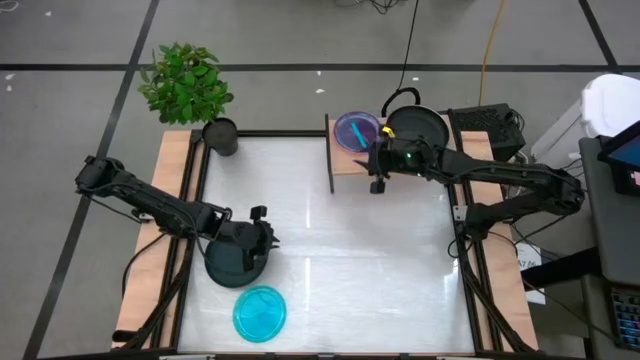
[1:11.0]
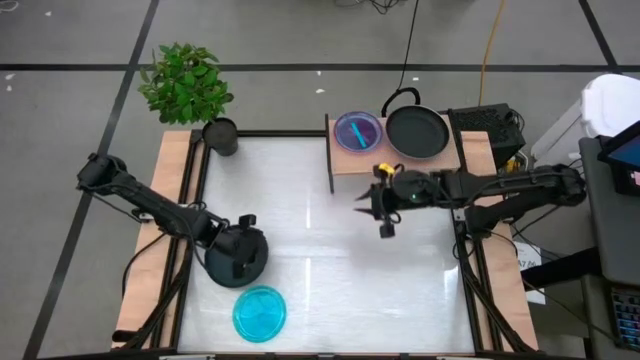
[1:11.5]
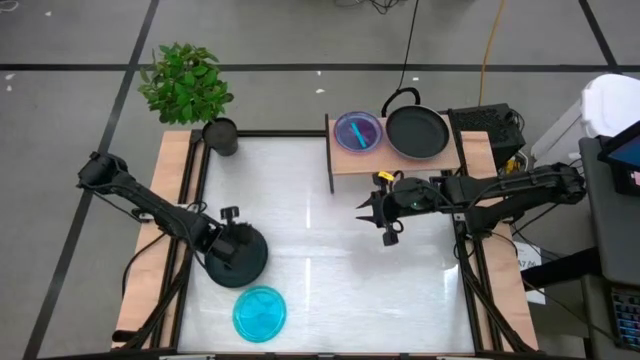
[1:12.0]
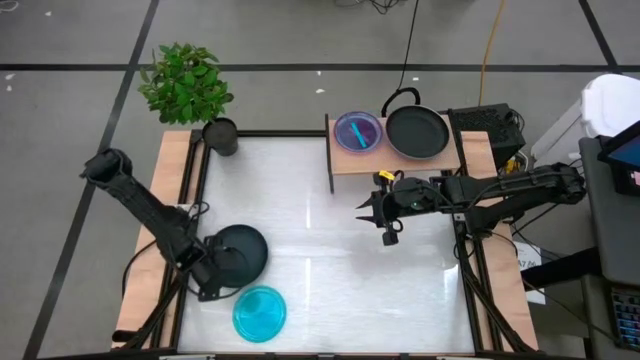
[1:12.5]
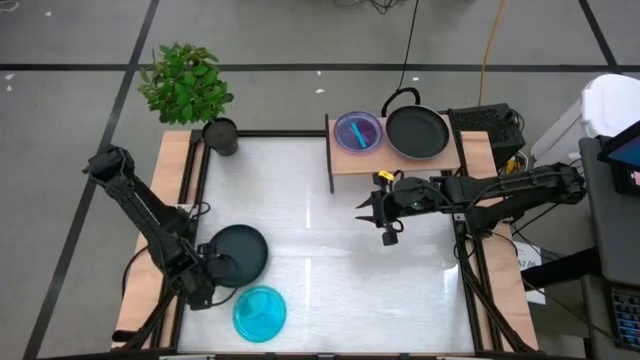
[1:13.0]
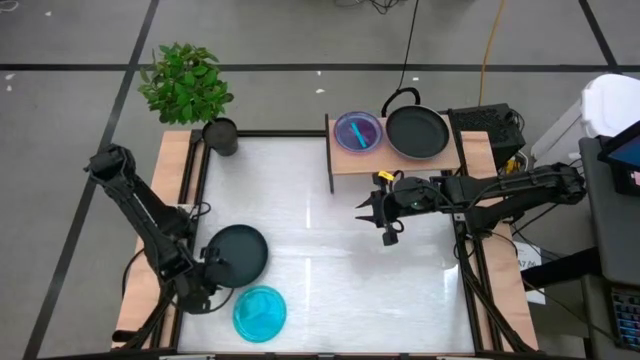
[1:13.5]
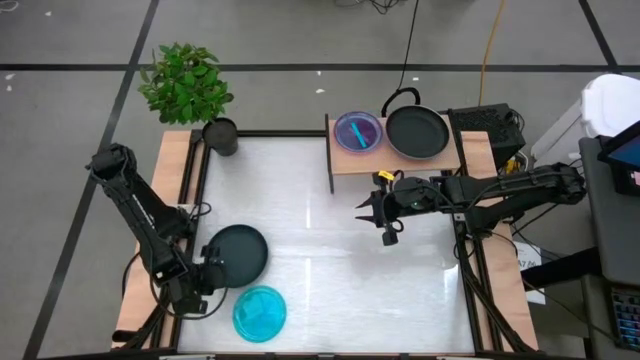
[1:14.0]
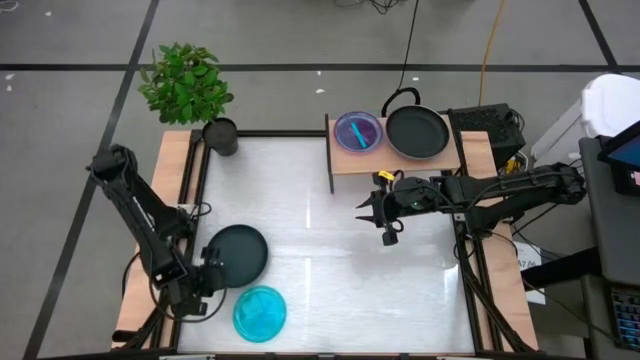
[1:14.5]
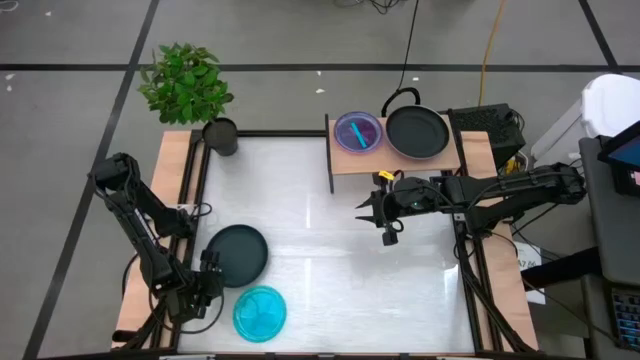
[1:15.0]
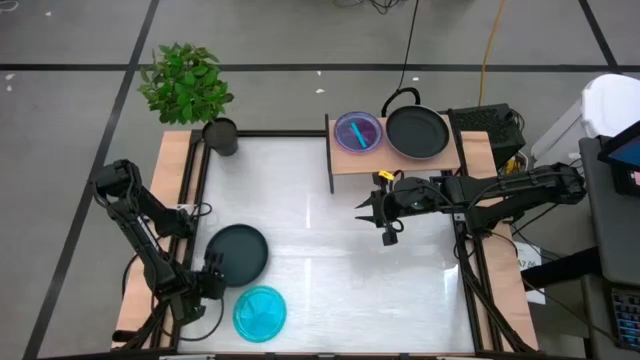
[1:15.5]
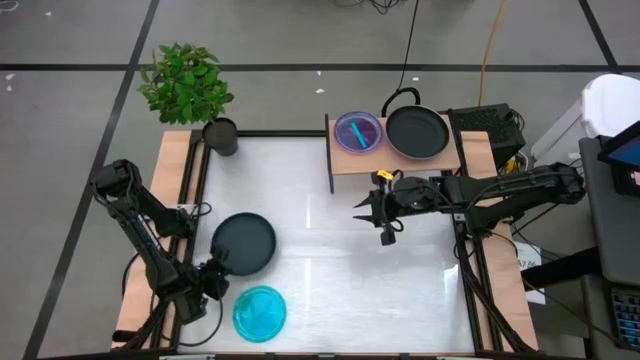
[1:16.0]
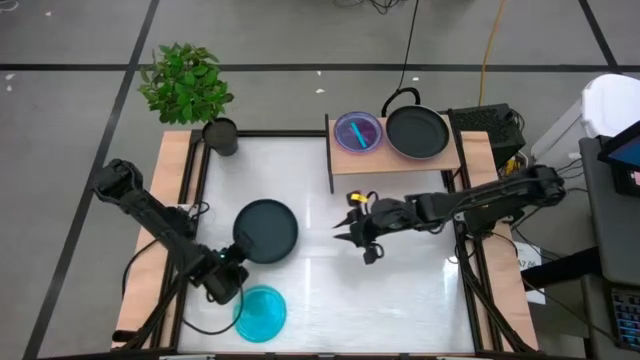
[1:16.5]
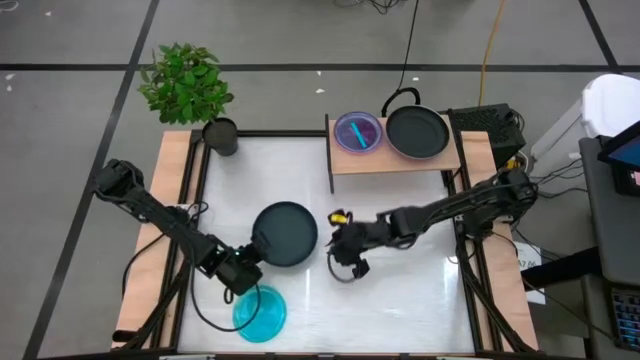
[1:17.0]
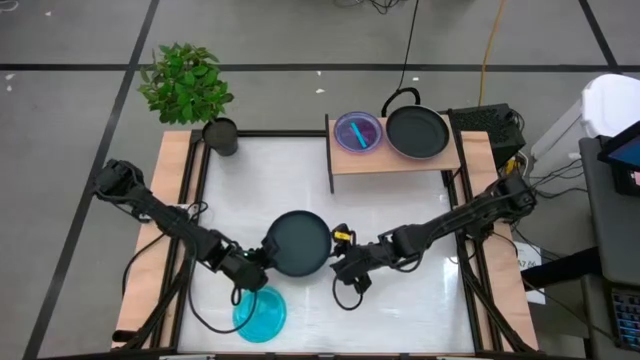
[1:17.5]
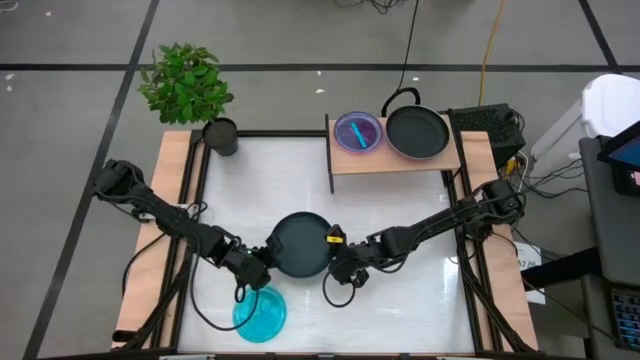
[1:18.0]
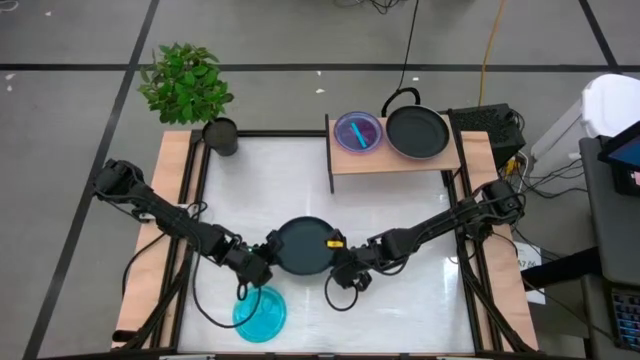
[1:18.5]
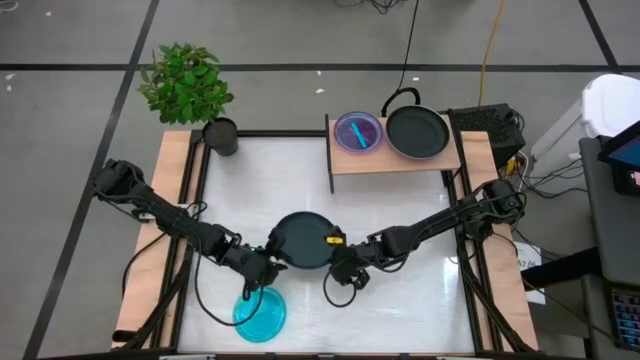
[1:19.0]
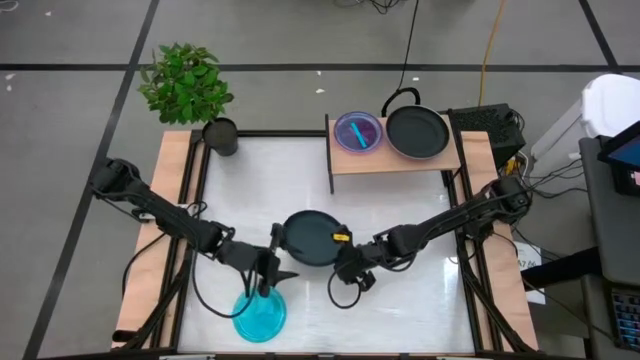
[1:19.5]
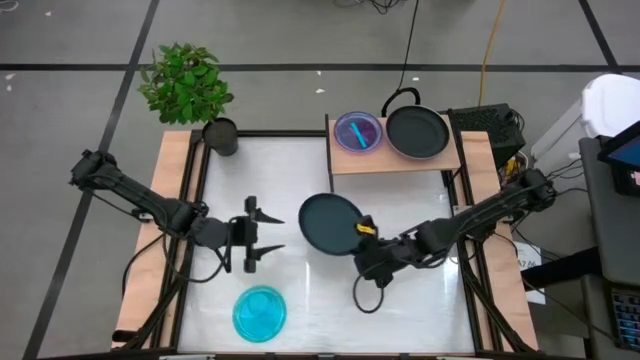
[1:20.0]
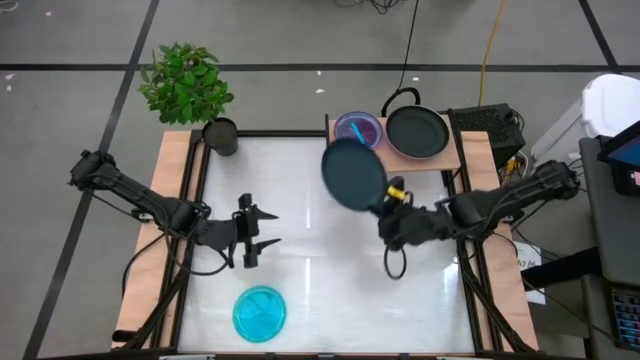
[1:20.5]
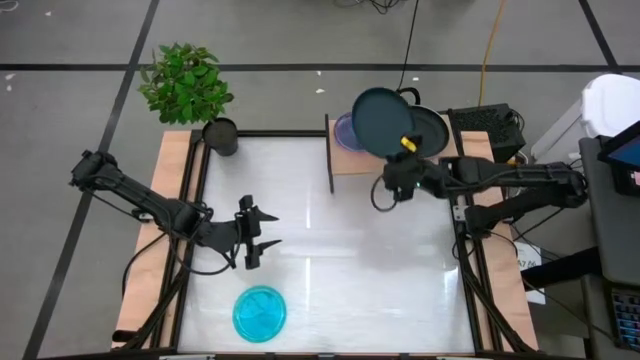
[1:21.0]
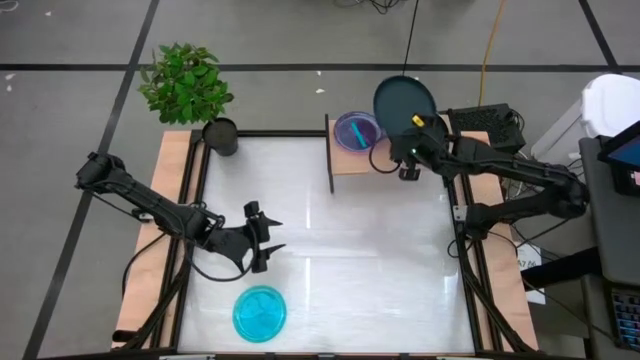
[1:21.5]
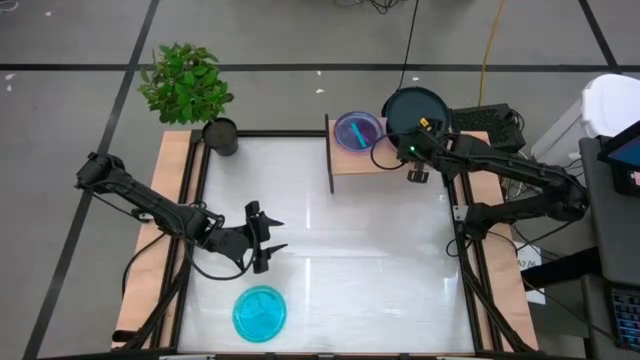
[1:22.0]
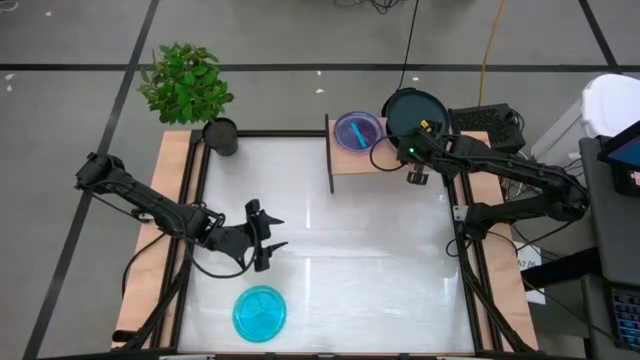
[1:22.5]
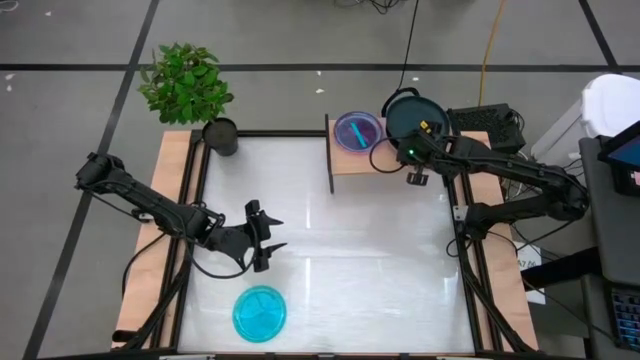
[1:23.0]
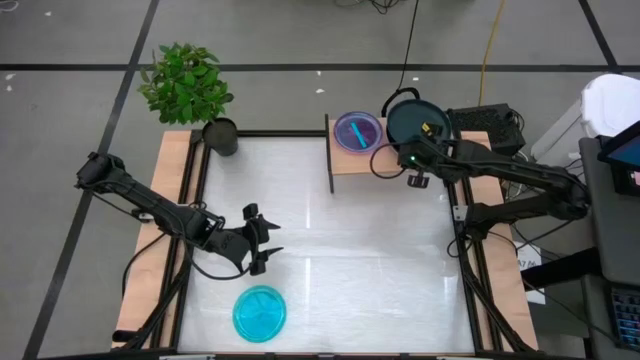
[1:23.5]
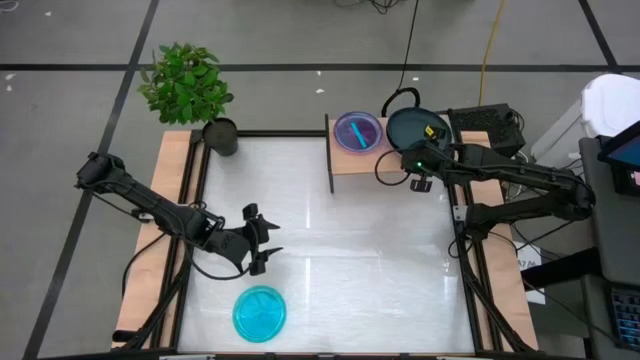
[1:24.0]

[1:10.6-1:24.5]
Task: Place and stack plates onto a shelf
Stack the dark blue plate on top of the black plate on the shelf

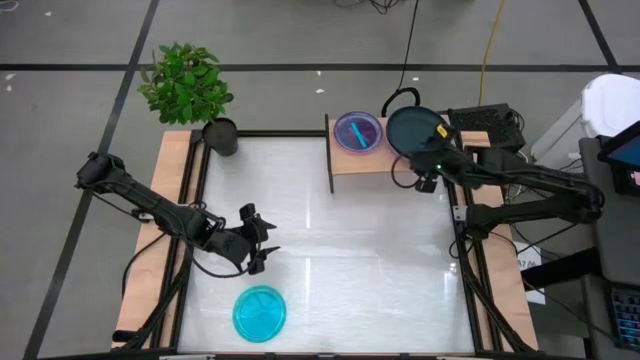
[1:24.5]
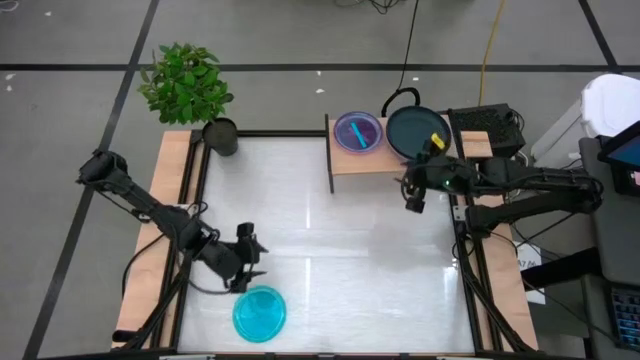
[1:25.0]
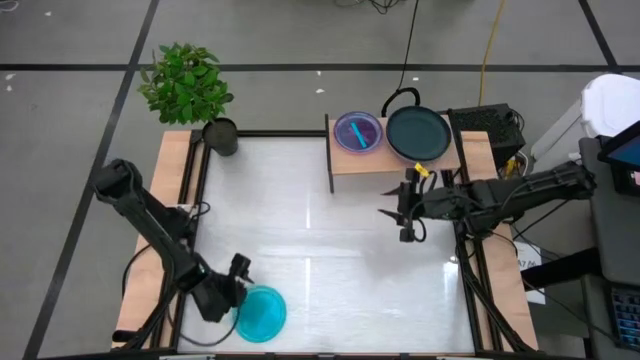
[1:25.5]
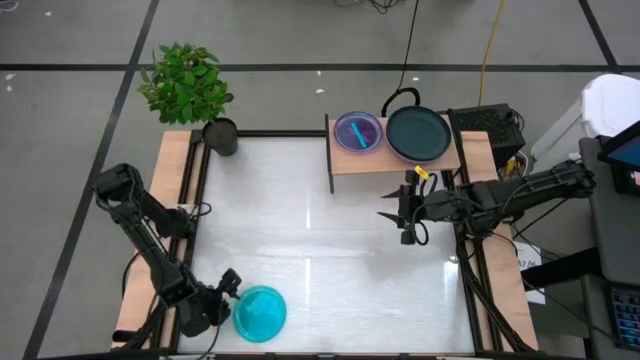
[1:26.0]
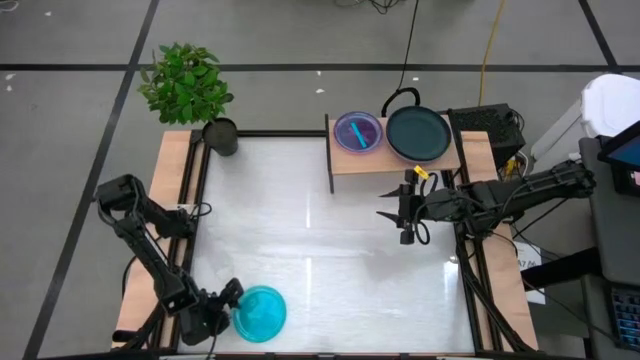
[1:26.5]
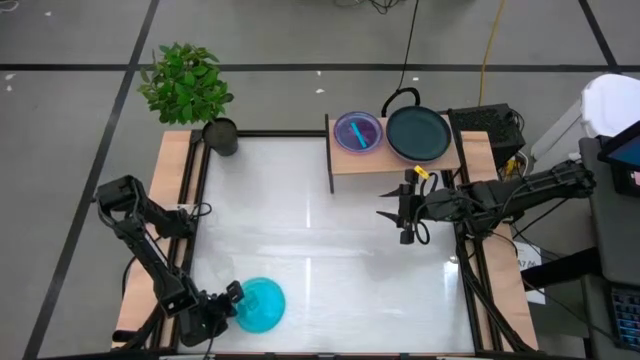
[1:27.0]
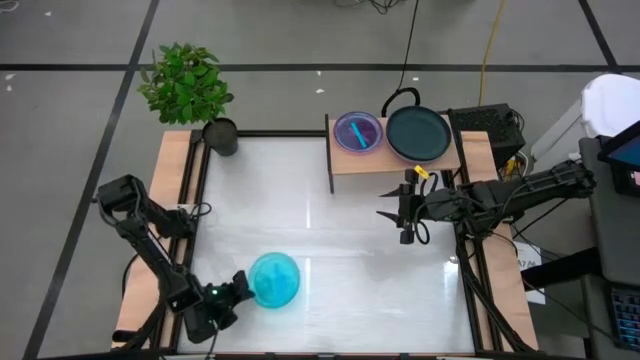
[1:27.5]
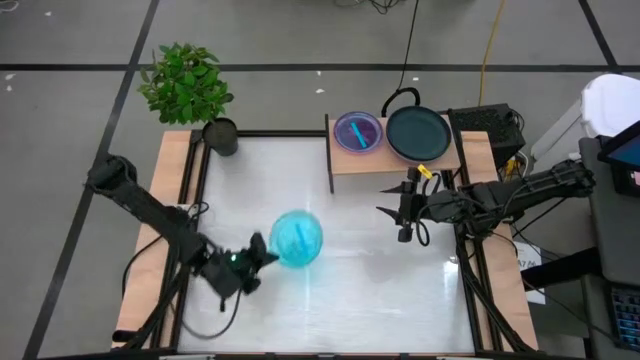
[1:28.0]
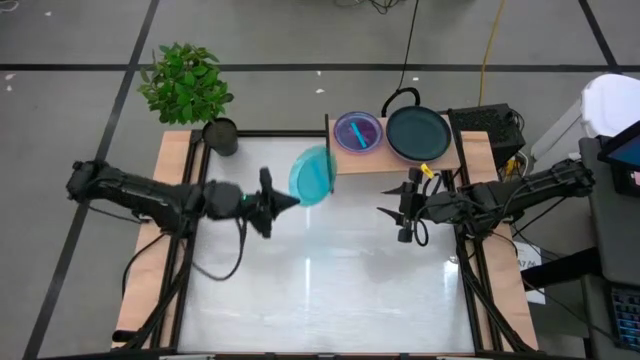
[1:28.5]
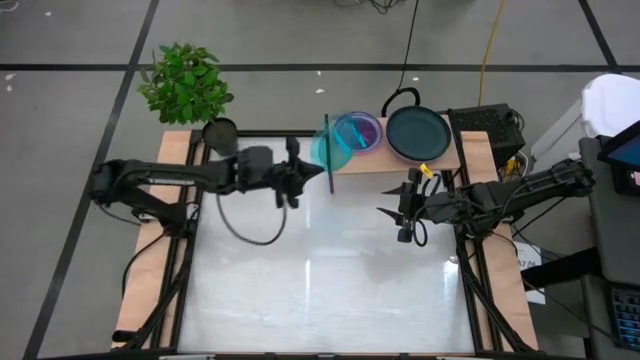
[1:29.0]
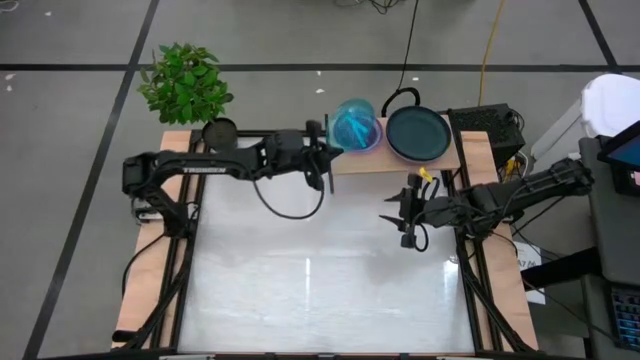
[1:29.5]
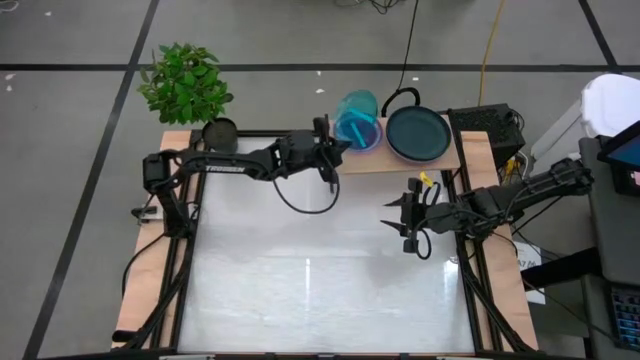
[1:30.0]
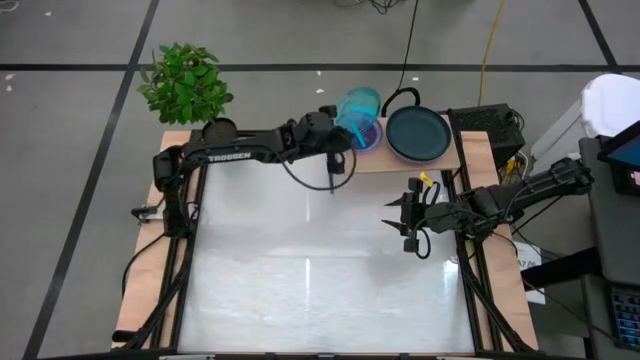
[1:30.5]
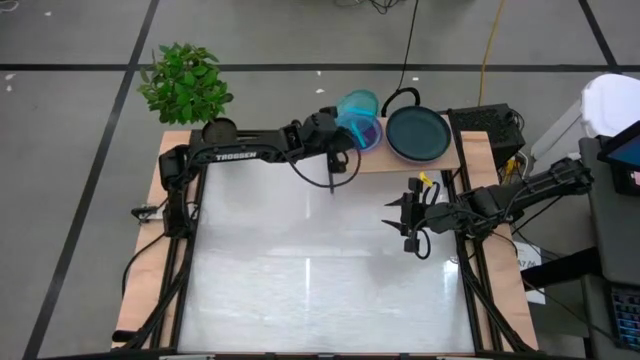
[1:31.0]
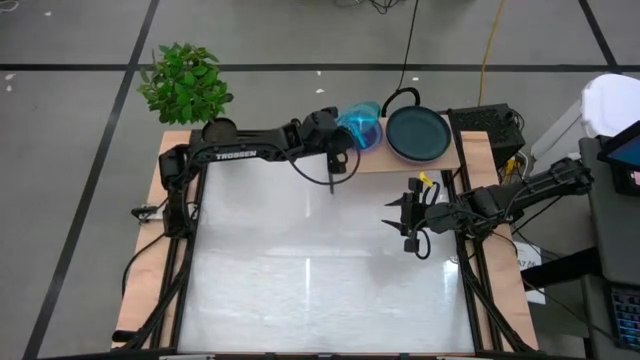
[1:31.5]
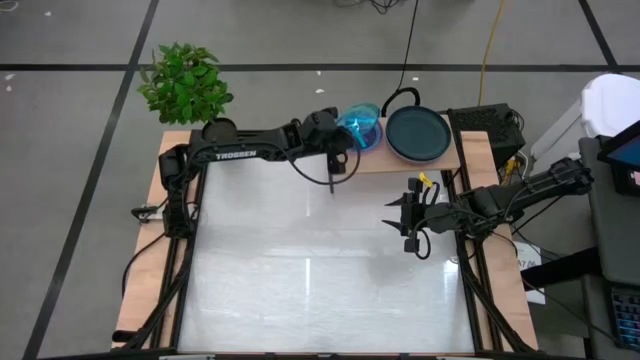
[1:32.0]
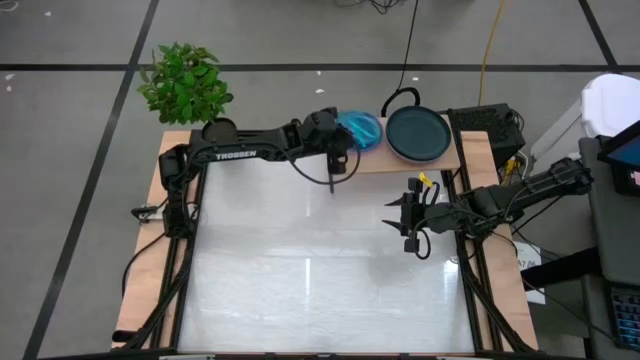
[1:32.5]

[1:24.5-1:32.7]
Stack the blue plate on top of the other blue plate on the shelf
